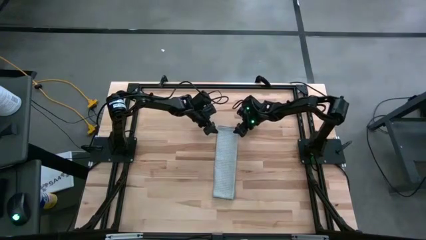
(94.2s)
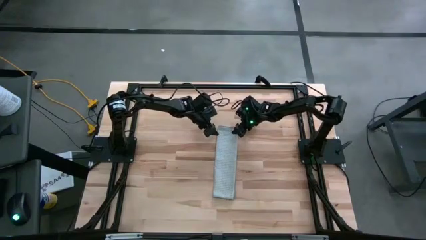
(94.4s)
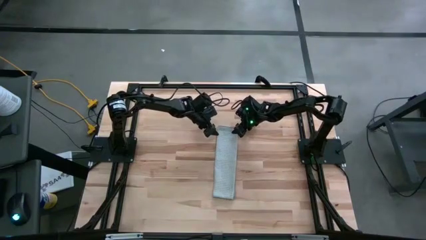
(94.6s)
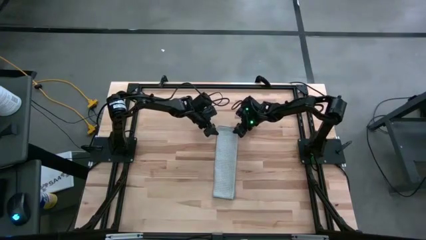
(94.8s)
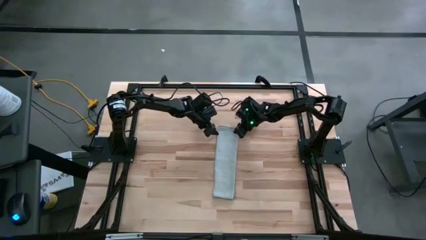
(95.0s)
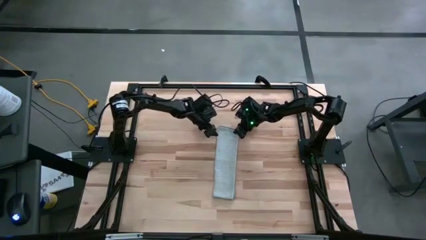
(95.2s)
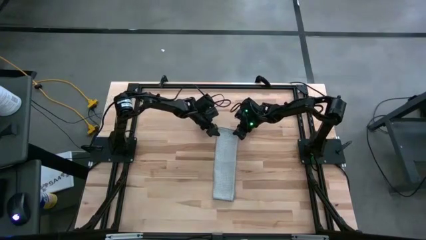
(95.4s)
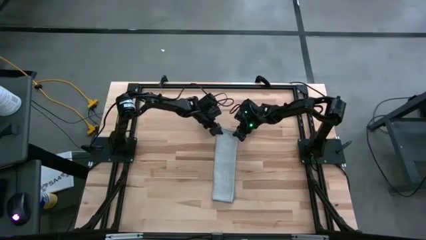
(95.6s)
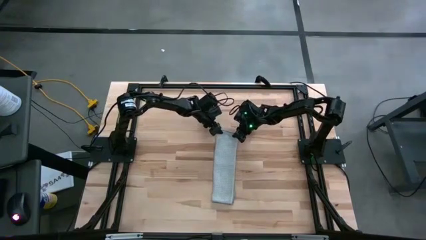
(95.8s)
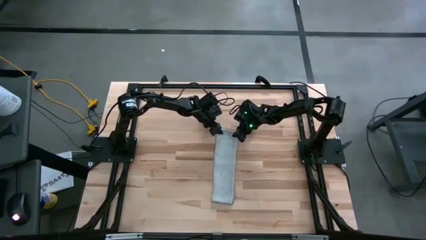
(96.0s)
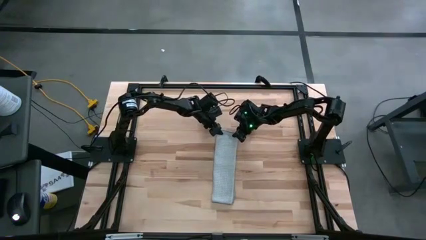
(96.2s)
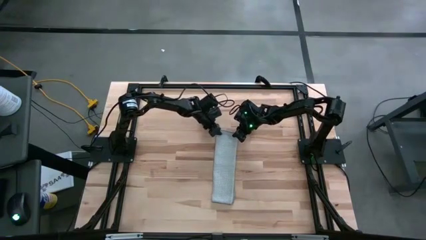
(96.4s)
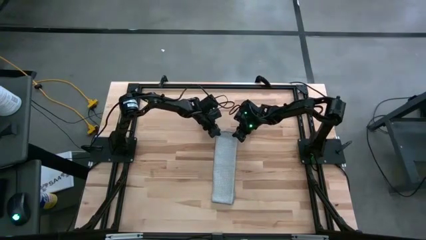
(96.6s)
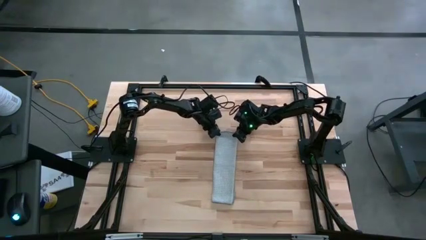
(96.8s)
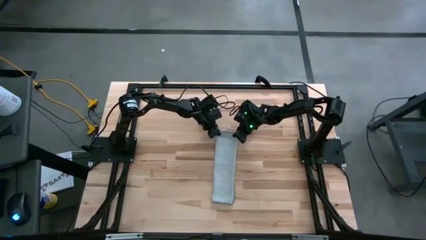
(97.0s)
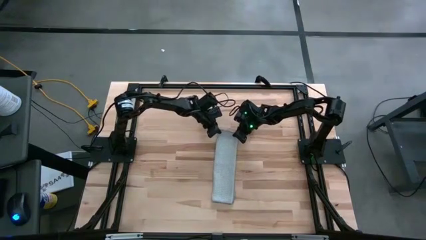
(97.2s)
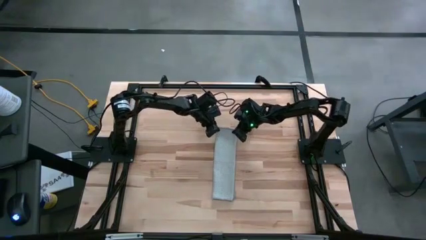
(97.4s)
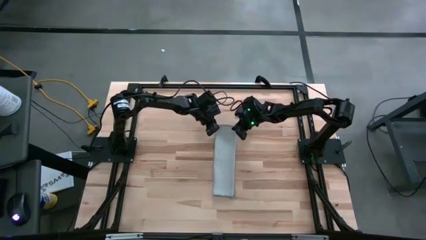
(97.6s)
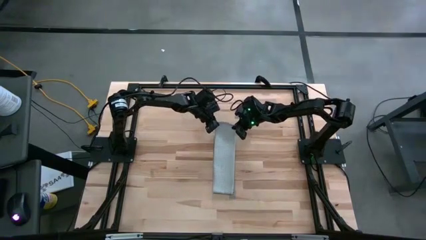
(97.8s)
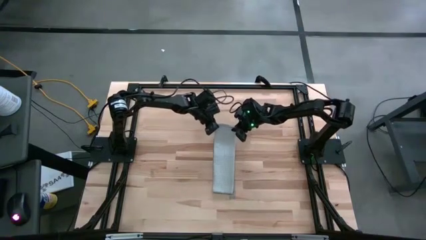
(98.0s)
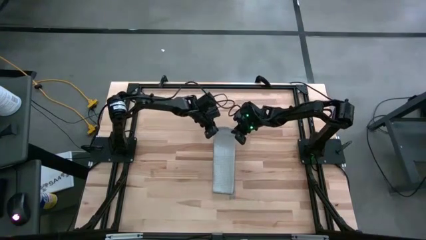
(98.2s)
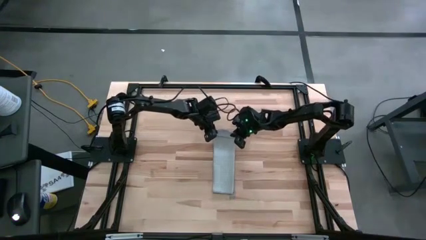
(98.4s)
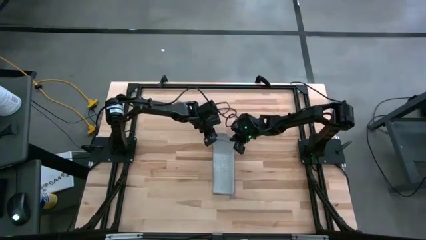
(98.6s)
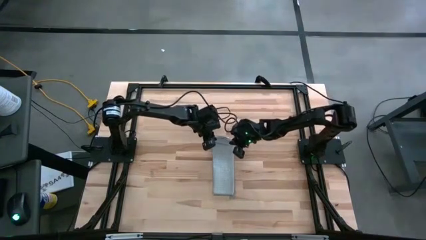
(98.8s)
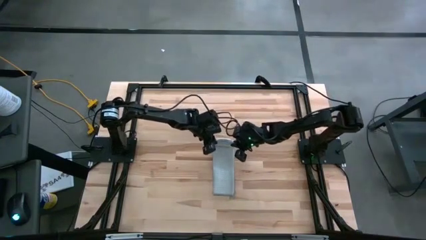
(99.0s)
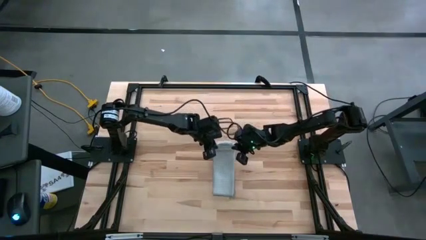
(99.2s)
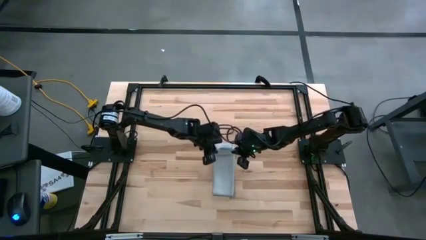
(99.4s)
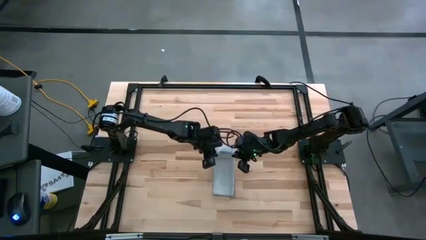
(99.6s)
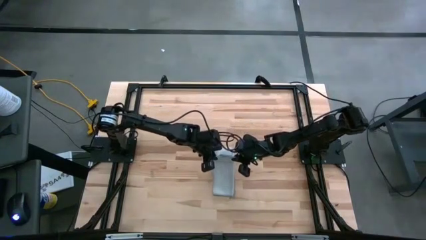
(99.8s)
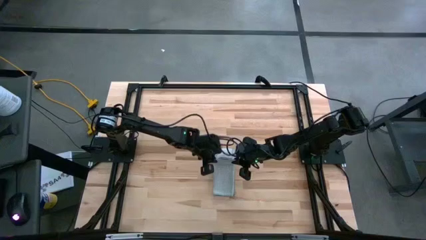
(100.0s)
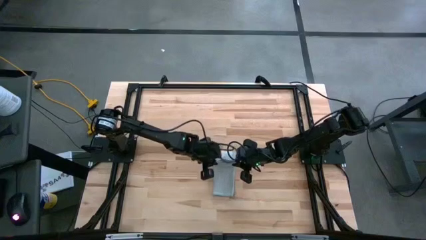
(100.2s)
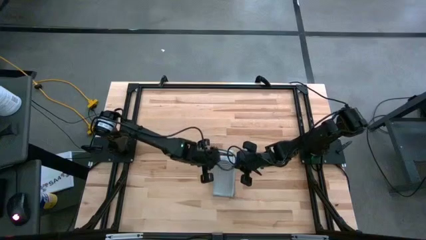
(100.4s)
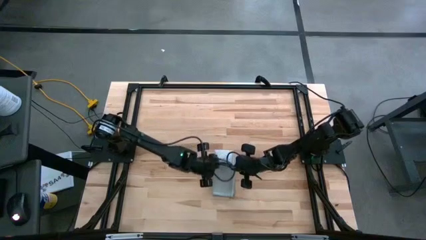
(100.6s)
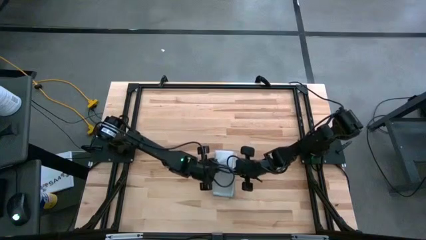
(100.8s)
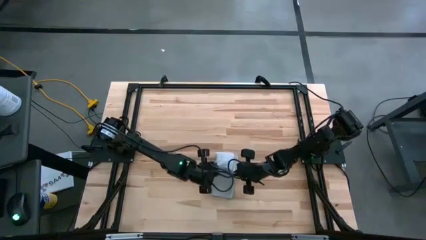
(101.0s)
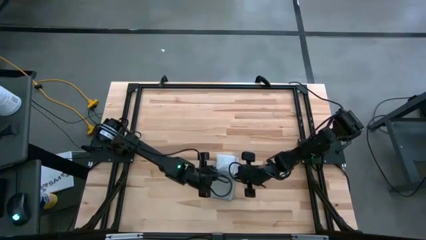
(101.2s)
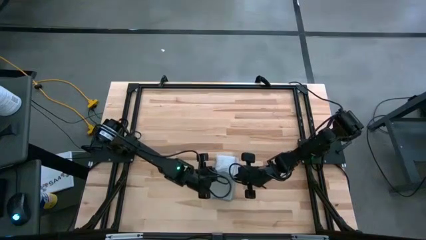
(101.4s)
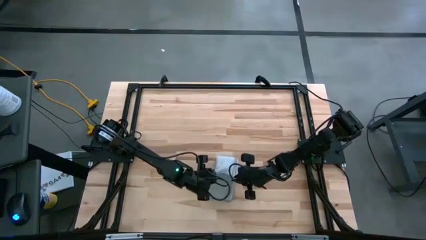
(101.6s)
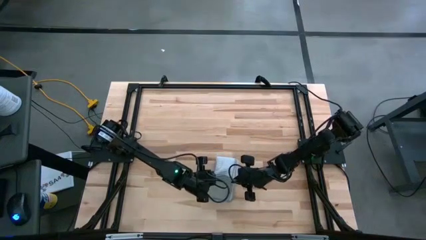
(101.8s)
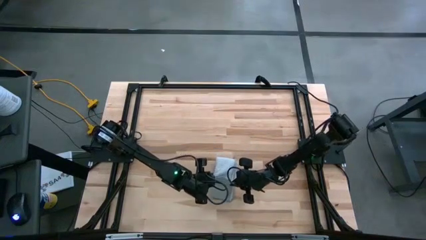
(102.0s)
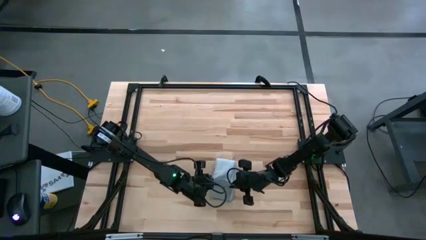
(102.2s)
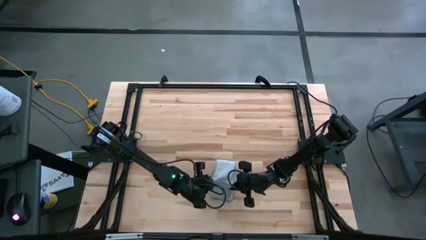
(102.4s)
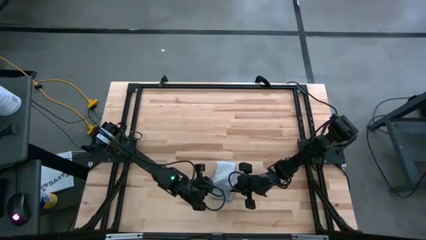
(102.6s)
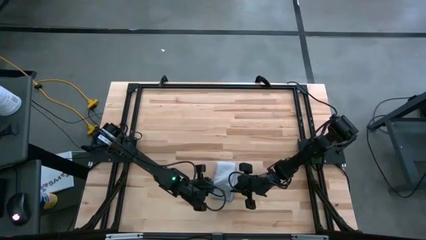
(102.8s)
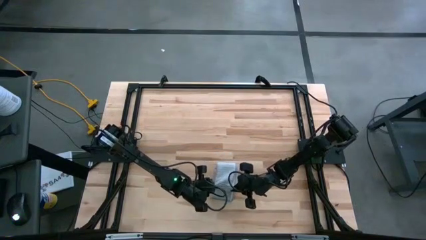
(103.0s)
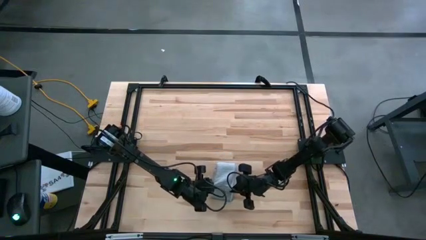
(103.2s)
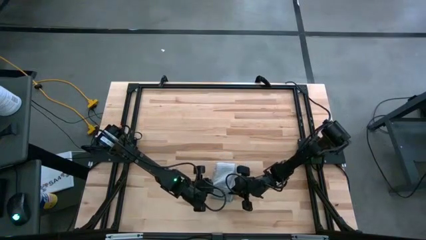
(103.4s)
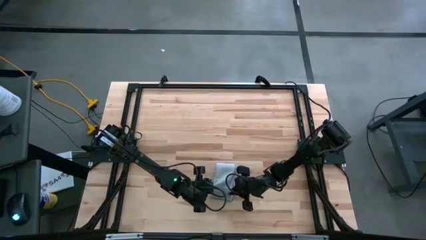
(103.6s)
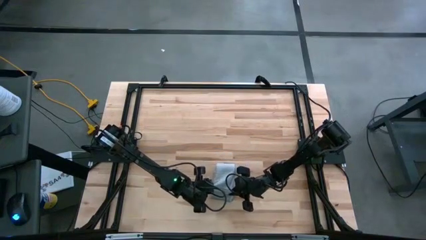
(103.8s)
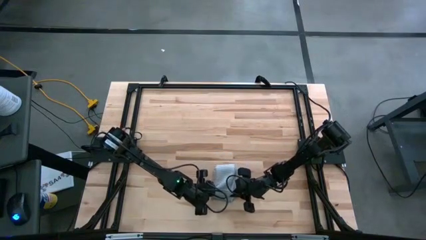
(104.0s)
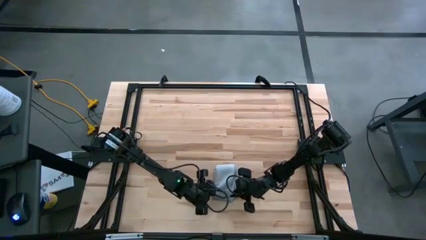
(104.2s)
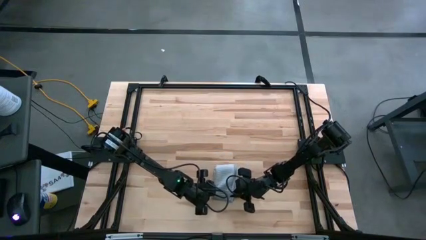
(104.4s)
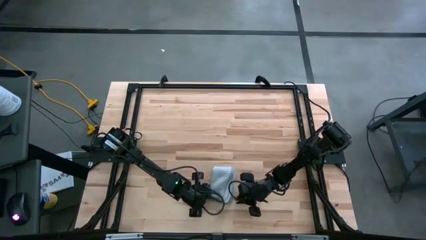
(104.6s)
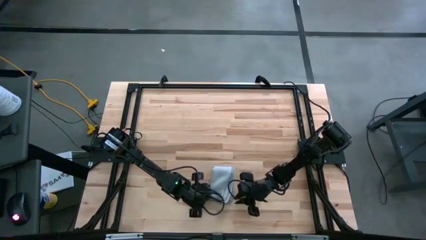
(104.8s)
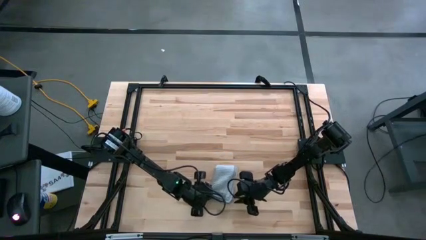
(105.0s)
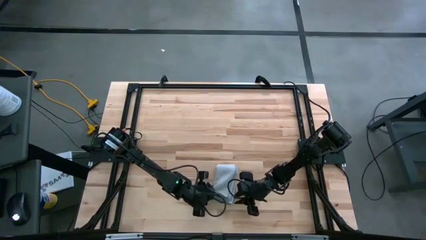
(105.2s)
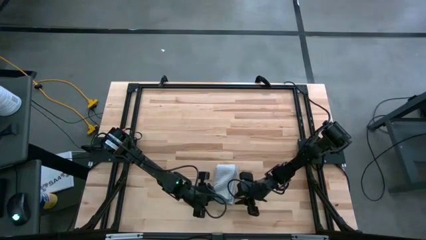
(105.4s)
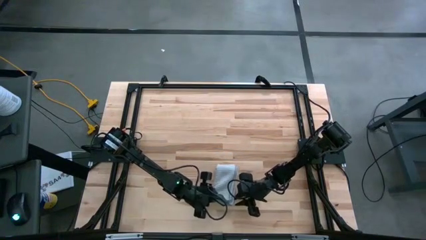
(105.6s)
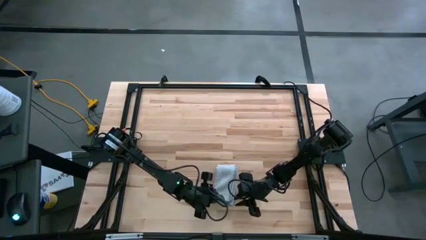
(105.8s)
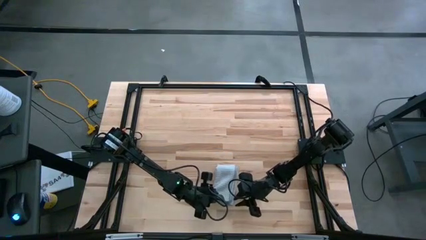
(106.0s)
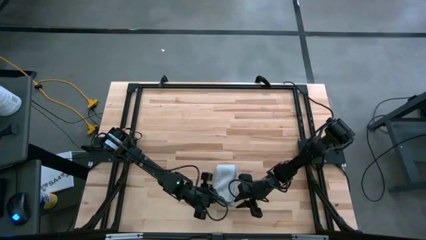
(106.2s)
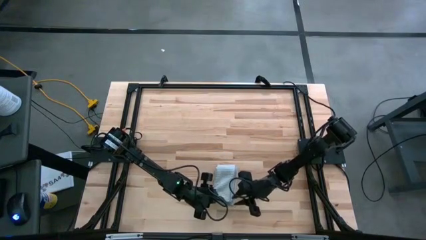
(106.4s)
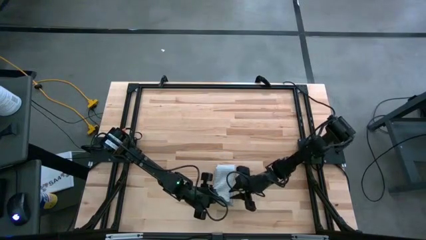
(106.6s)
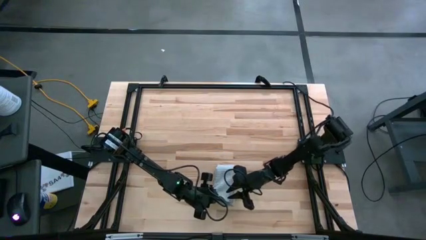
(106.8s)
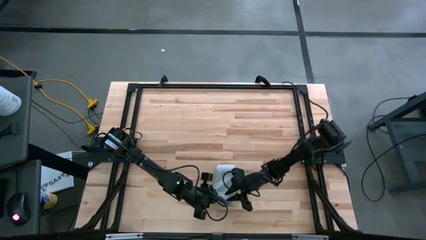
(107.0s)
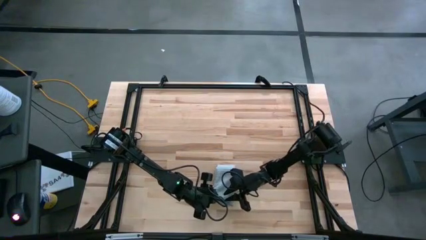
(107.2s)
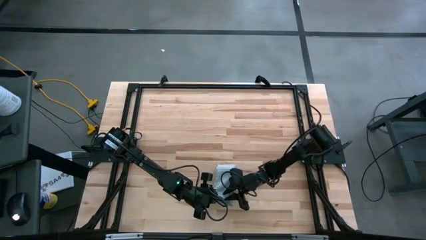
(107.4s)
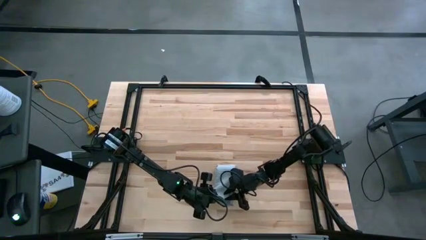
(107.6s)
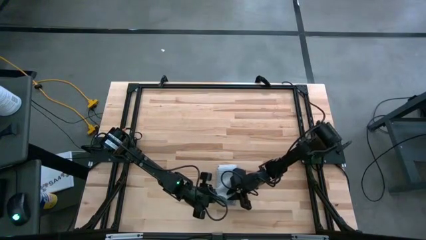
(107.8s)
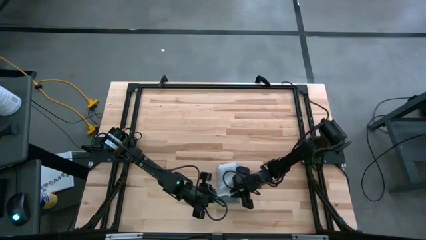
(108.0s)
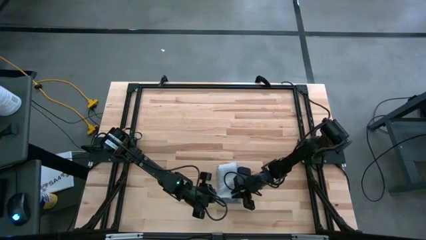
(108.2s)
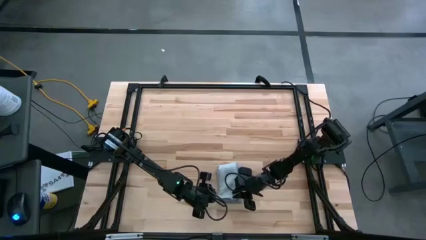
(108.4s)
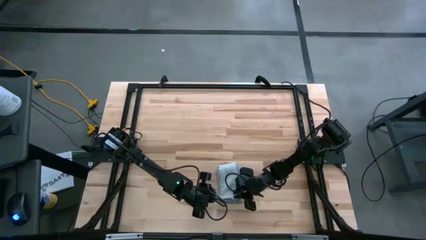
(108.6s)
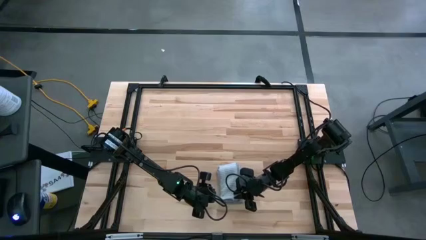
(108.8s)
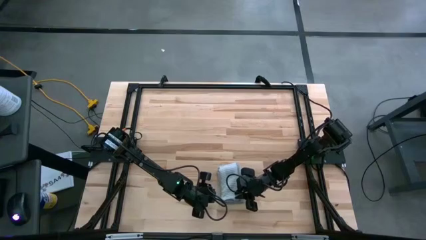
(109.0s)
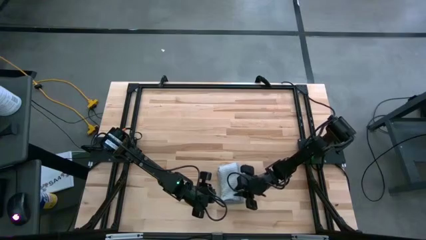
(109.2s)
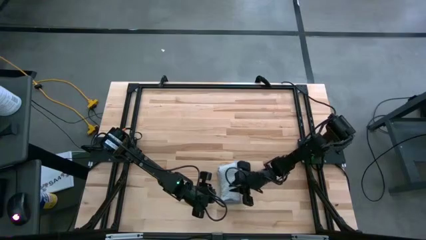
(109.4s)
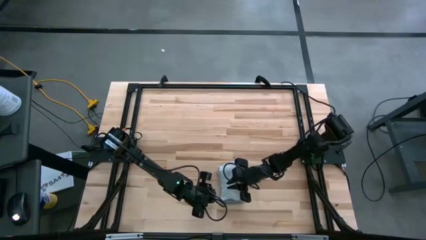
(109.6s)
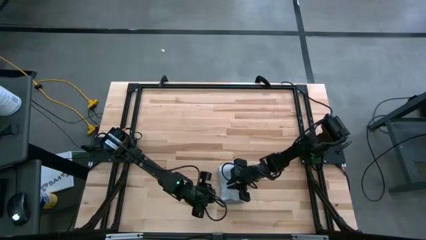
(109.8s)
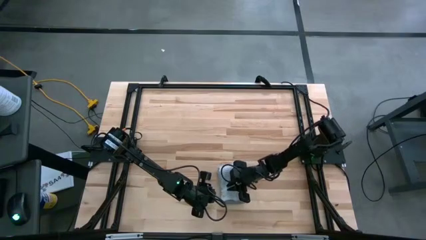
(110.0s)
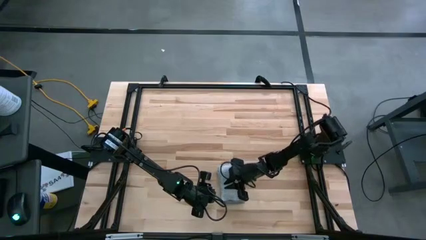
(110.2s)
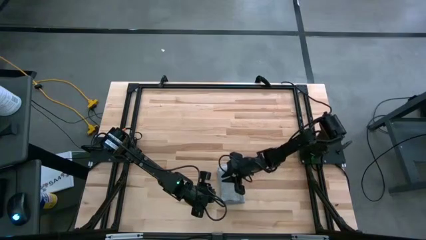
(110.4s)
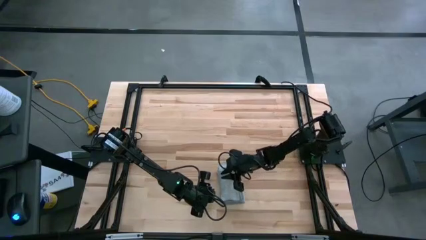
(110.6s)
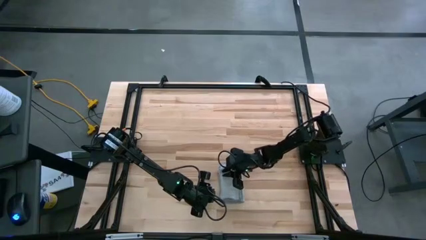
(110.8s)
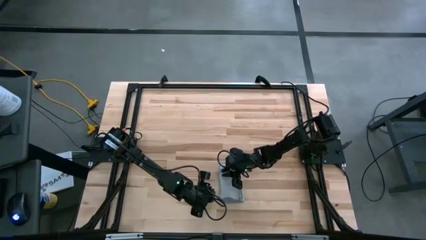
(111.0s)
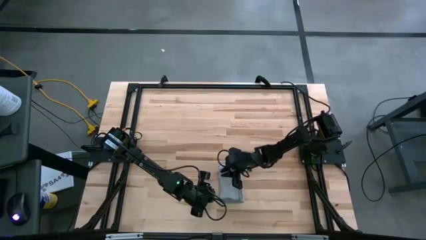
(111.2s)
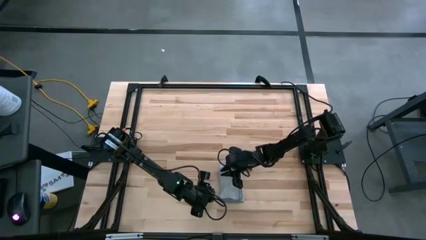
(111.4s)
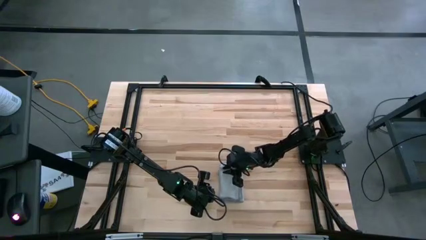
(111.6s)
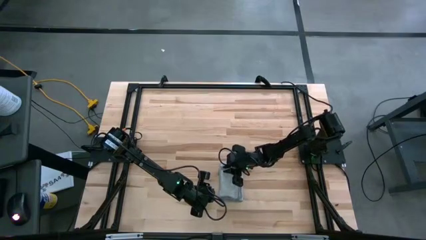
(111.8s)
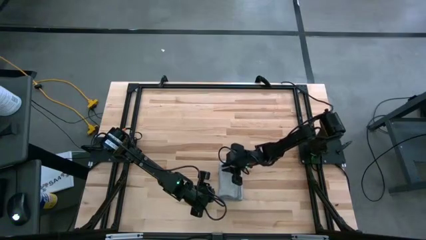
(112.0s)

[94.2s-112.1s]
Task: Fold microfiber towels
Fold the gray towel on the table
